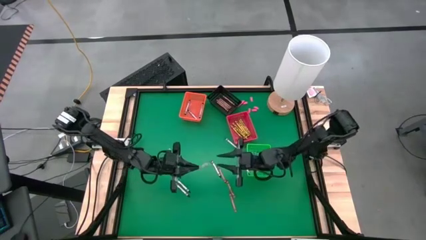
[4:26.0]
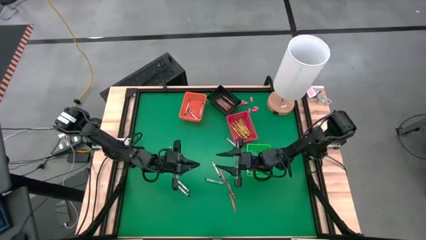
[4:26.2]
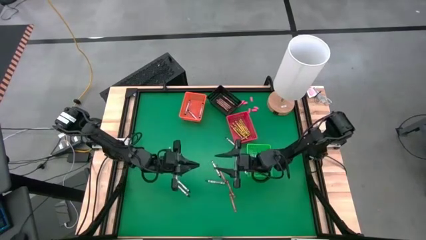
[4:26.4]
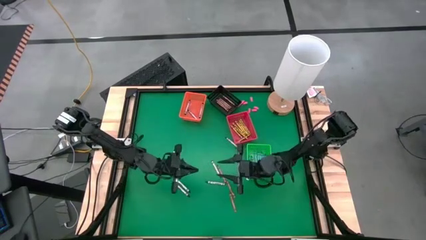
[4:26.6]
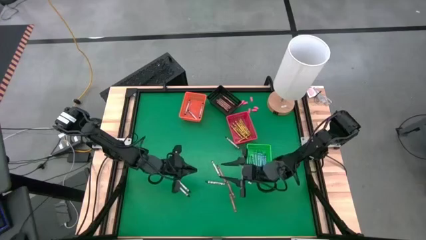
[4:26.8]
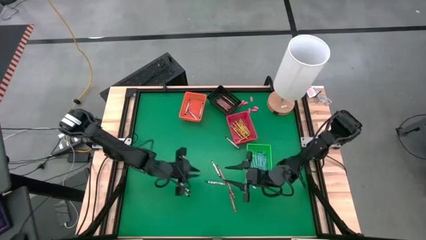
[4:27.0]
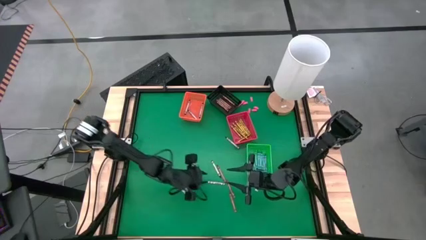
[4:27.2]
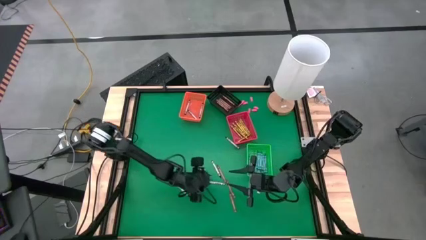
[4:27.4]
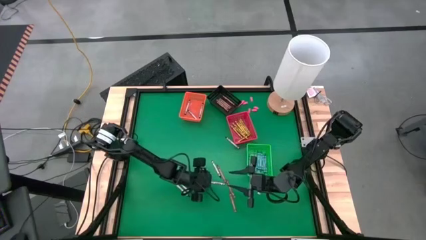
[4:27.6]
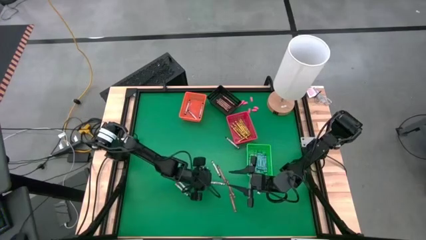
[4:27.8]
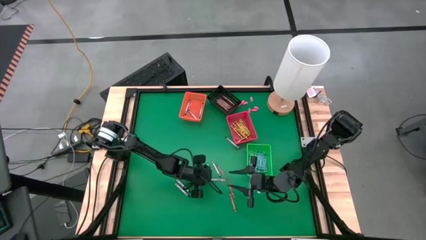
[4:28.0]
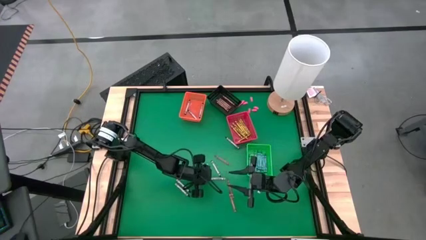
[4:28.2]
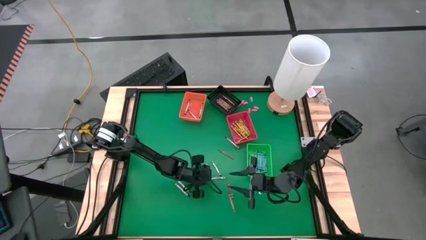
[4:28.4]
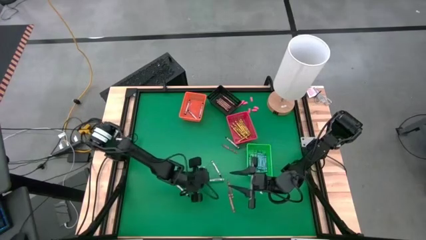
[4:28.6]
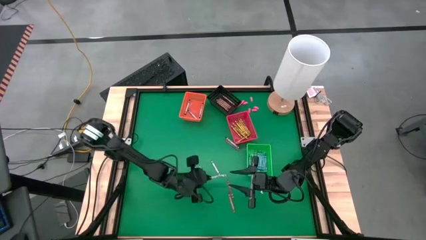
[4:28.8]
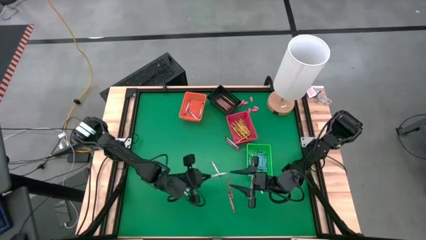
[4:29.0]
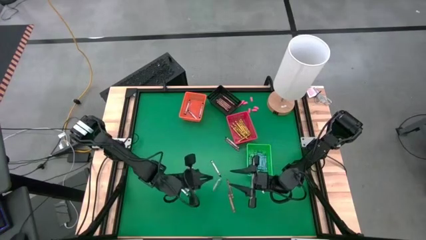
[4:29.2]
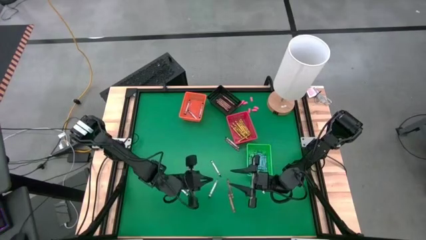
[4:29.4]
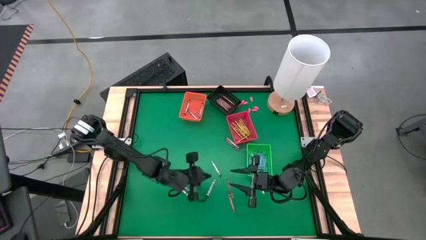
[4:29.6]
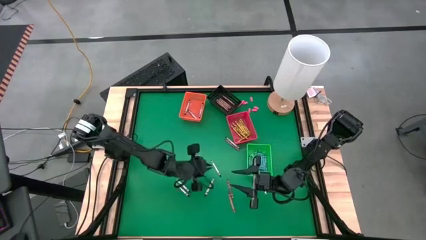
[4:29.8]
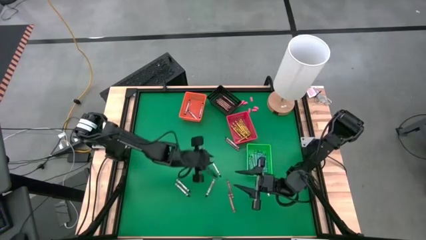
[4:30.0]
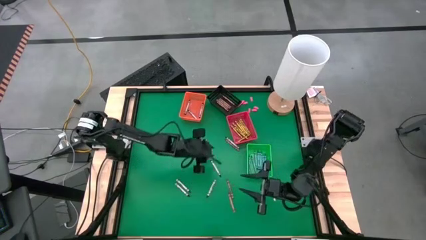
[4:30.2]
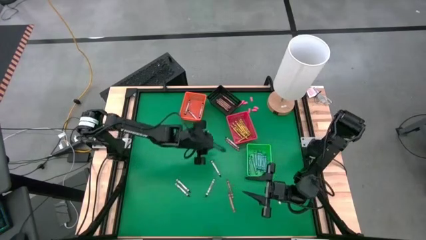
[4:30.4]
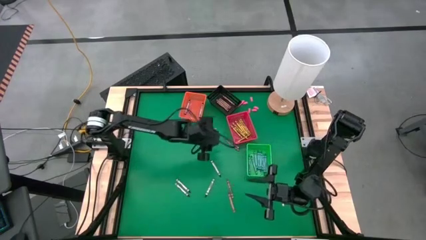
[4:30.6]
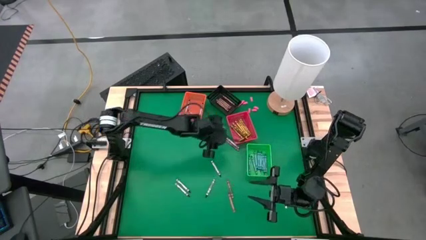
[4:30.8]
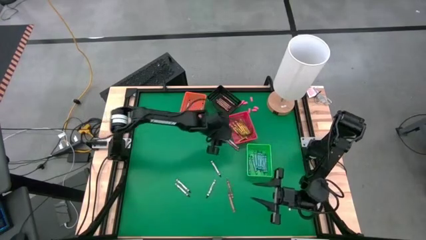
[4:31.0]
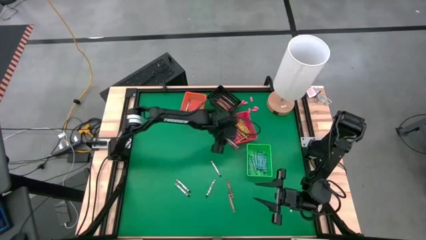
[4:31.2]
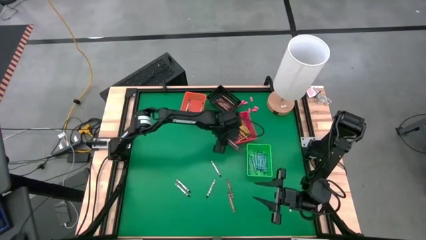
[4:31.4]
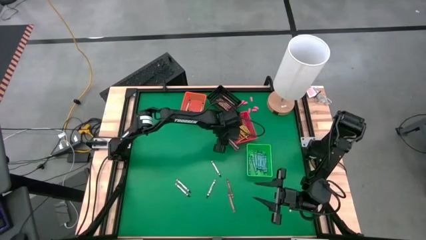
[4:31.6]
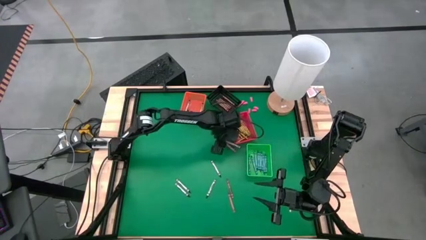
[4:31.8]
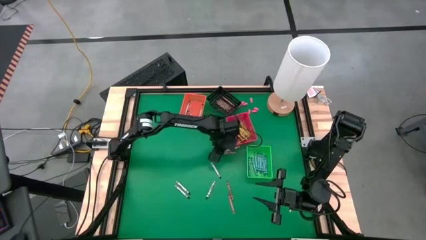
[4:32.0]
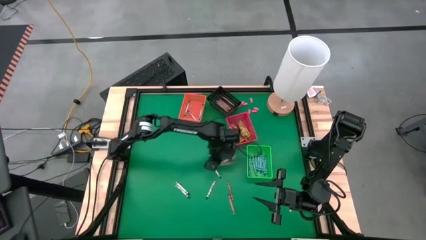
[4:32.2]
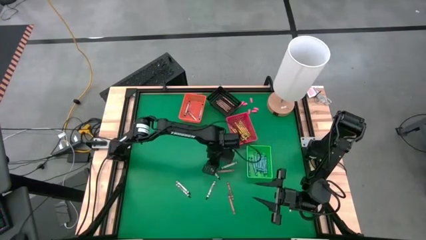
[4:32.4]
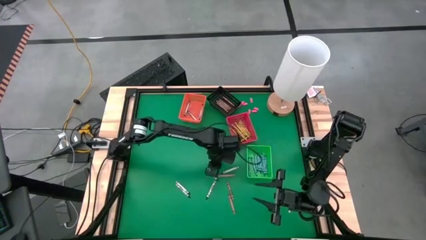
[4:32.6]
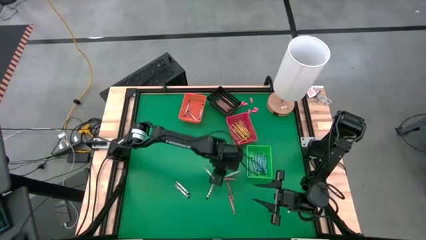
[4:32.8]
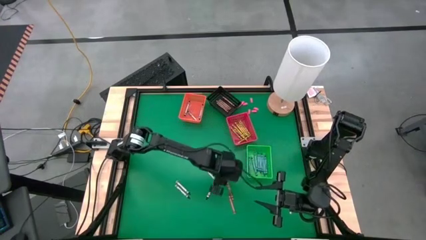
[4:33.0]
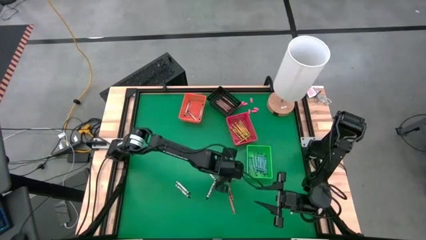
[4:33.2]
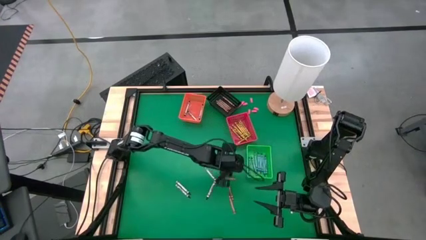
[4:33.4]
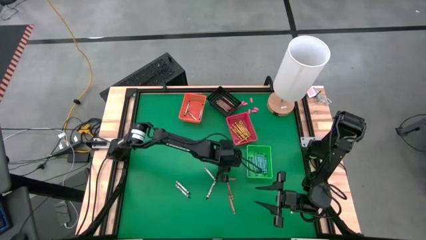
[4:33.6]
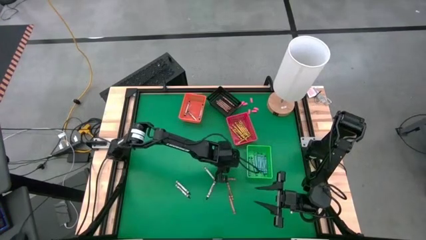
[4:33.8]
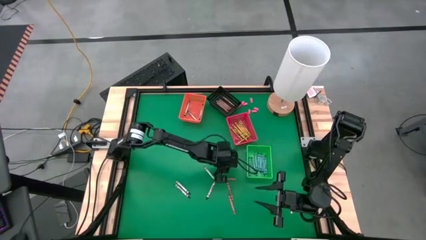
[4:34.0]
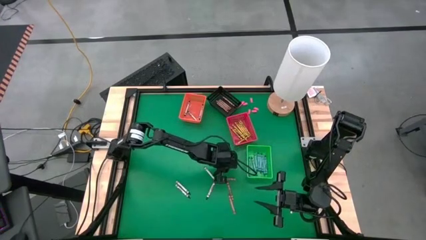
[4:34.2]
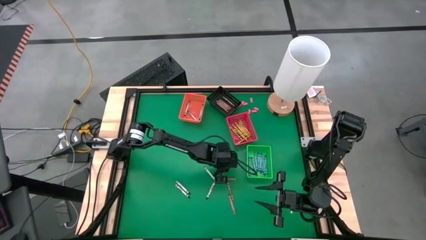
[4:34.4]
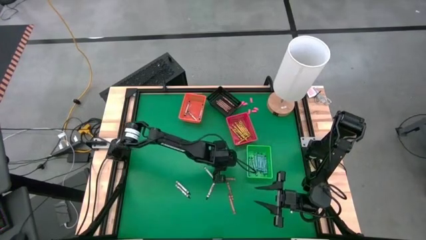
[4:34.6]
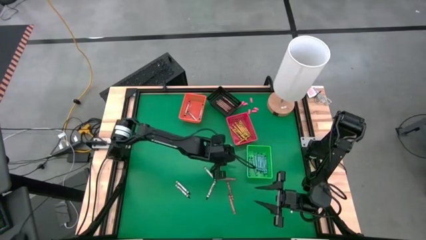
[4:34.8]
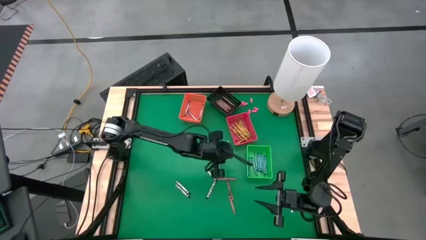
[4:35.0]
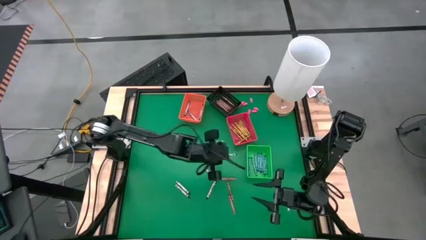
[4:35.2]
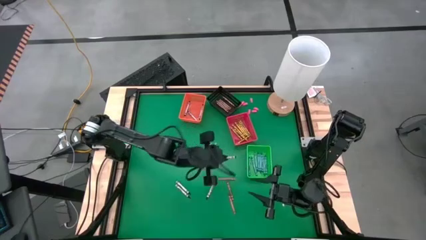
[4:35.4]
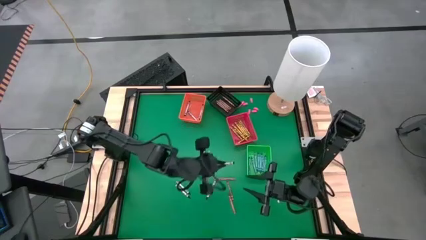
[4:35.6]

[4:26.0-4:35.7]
Task: Sort crayons
Put the black crayon into the orange bin

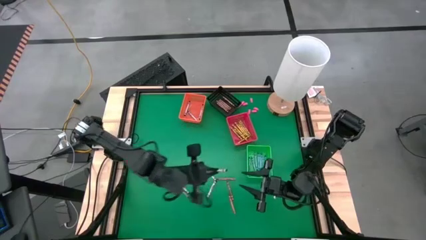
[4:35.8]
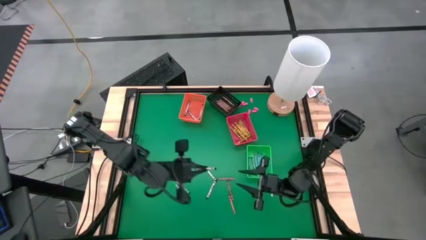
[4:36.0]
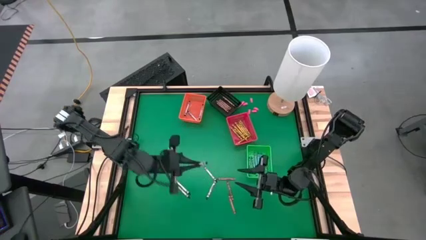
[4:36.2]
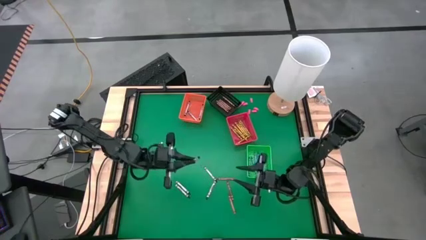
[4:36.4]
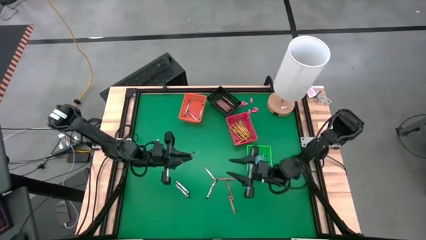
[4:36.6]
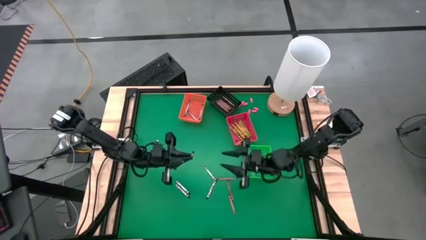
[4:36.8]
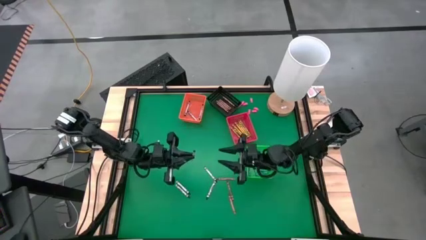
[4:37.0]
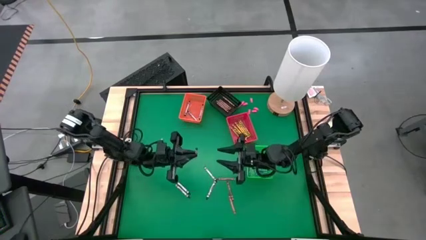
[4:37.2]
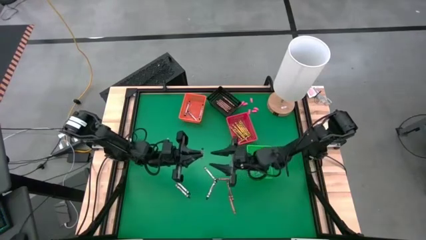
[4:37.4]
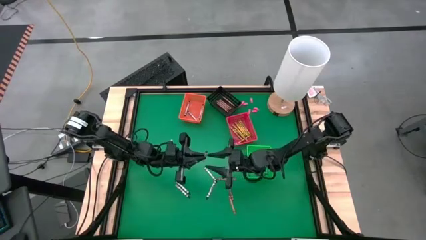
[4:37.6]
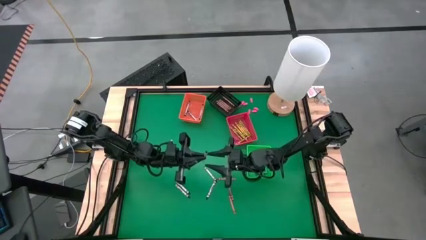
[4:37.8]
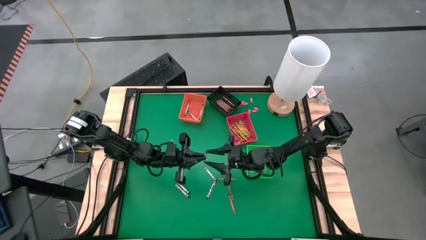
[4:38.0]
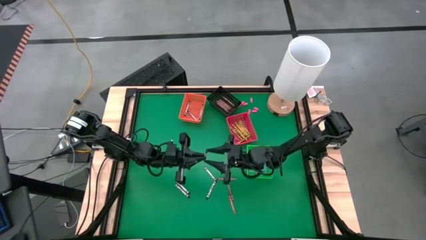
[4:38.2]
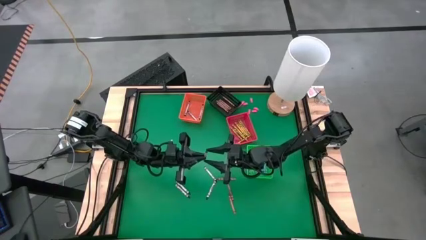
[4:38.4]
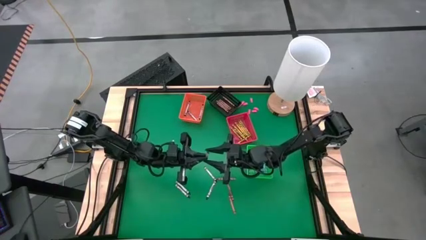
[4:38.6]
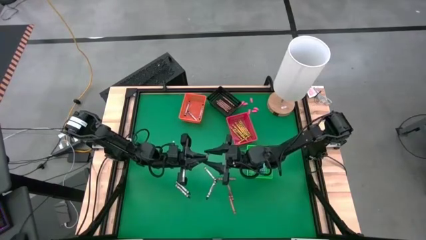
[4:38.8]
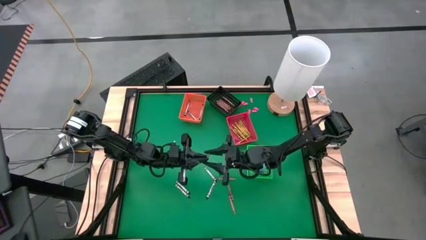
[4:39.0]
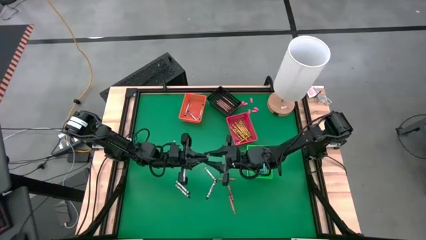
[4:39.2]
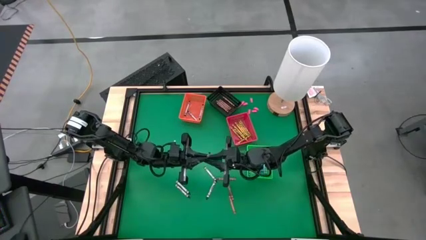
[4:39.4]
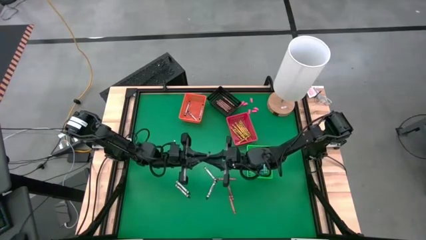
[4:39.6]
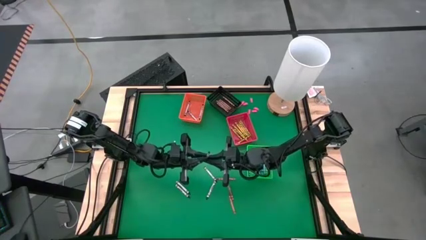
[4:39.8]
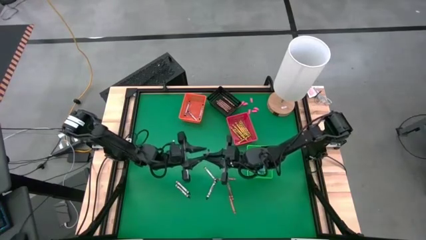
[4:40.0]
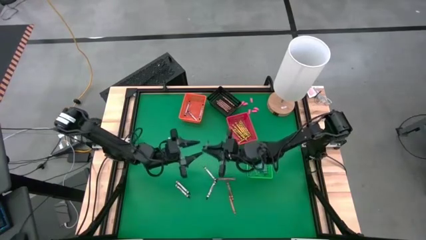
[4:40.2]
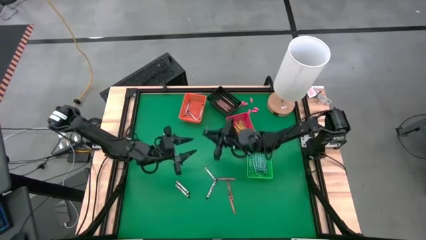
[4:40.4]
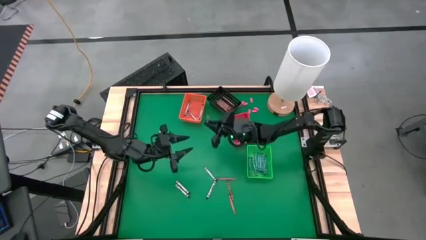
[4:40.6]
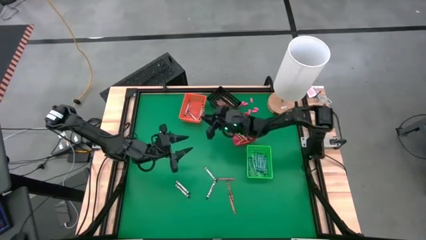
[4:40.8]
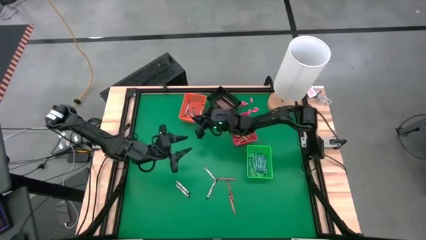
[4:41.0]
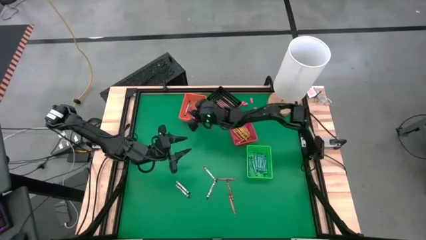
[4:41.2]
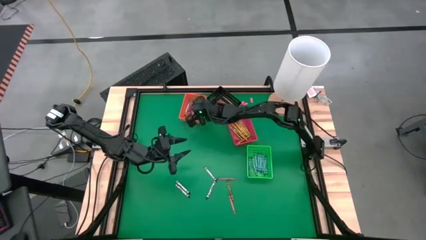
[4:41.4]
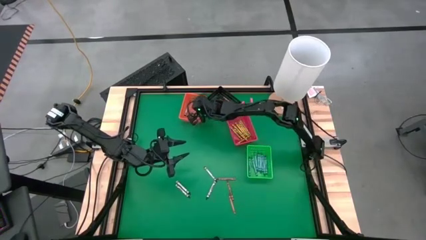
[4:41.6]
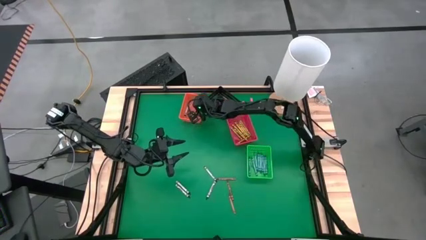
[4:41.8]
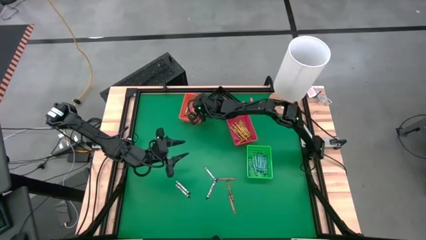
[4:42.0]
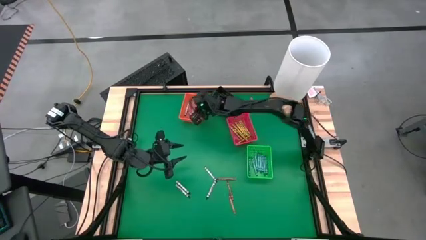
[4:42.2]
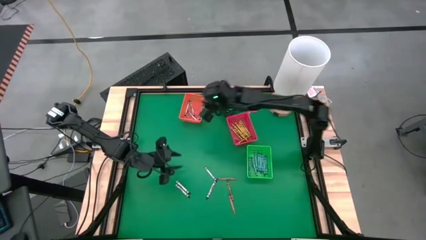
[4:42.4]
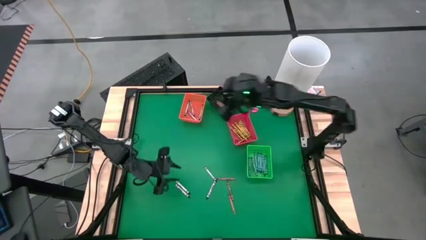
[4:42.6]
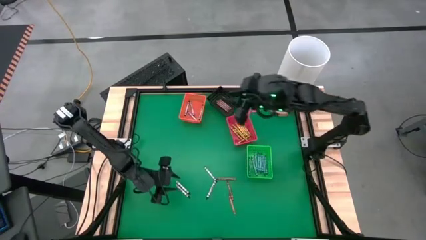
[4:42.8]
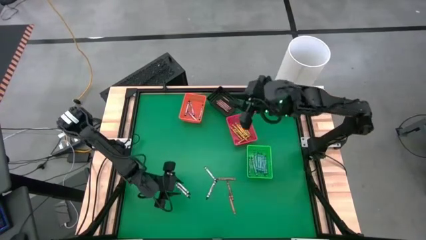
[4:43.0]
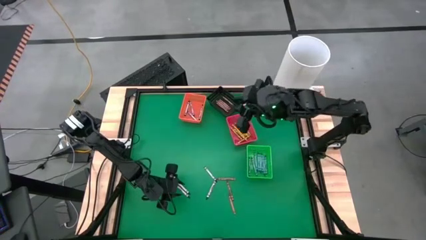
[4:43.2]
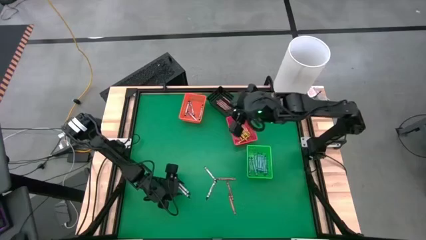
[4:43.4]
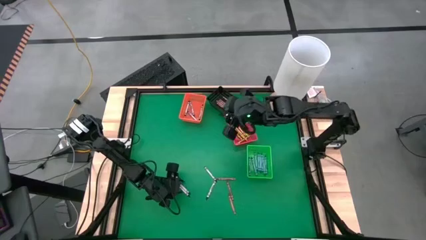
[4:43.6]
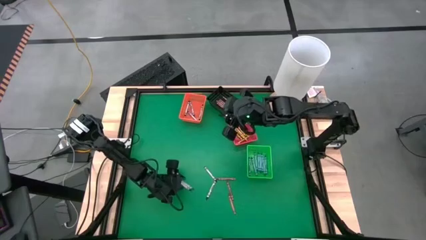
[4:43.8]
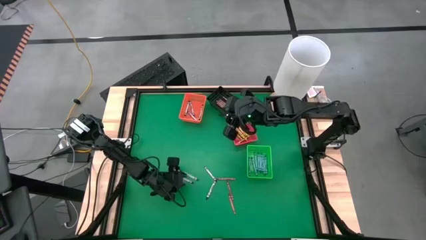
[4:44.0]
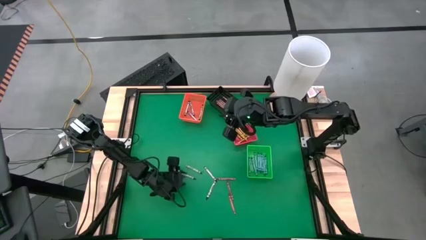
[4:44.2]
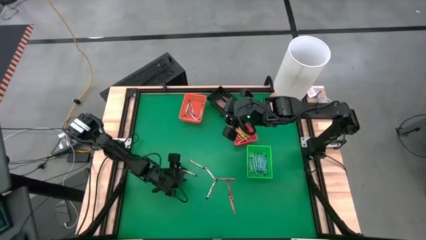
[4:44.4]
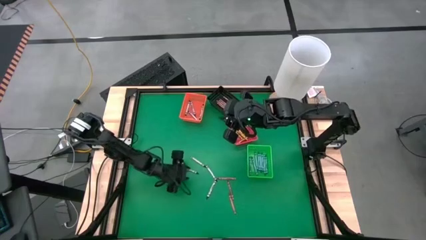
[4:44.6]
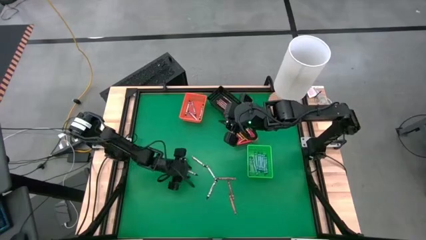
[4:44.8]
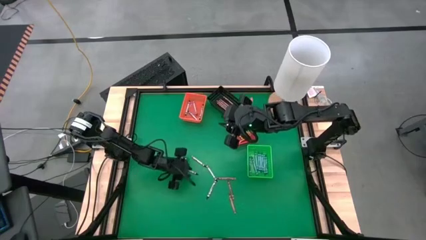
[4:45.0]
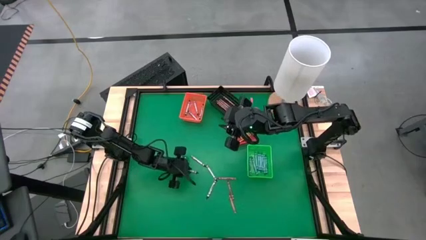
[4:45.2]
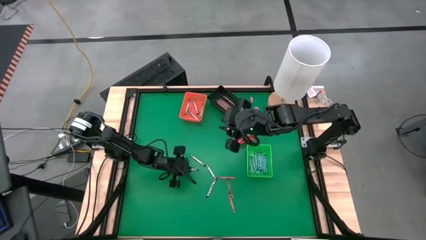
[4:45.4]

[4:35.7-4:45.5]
Put the black crayon into the orange bin
